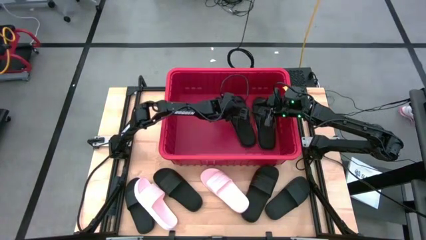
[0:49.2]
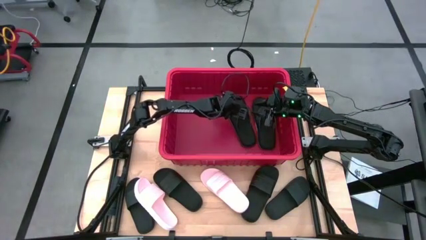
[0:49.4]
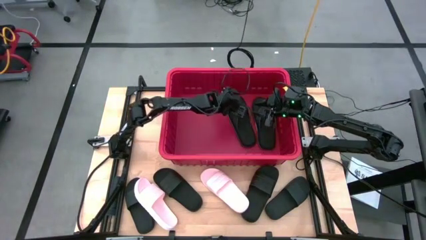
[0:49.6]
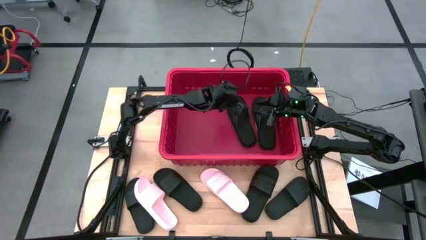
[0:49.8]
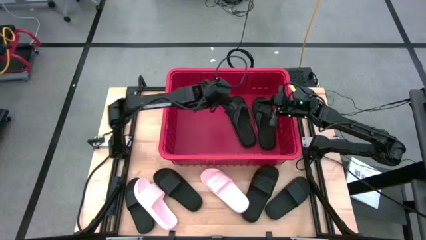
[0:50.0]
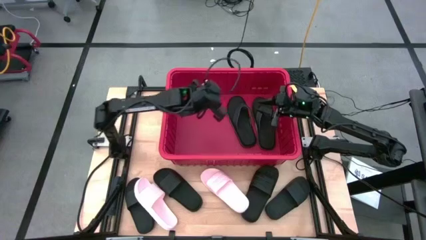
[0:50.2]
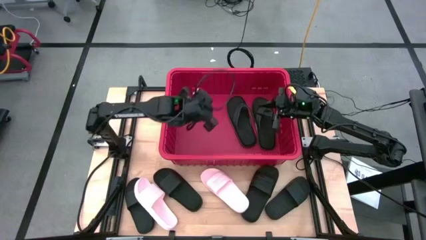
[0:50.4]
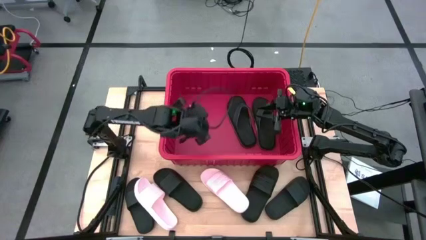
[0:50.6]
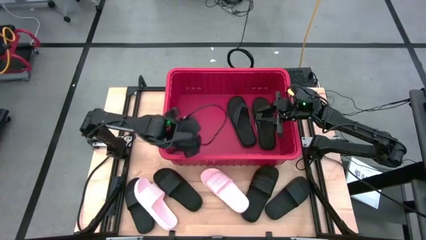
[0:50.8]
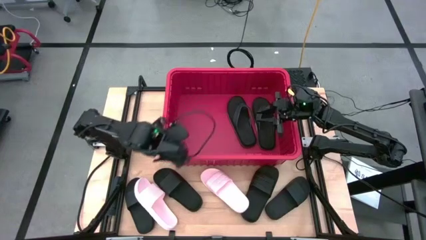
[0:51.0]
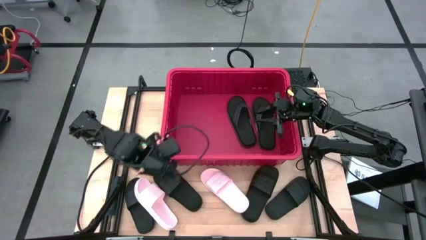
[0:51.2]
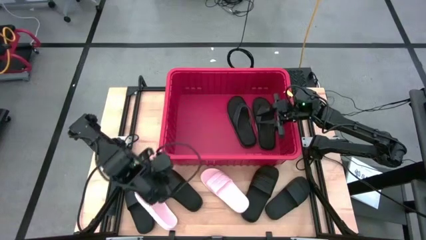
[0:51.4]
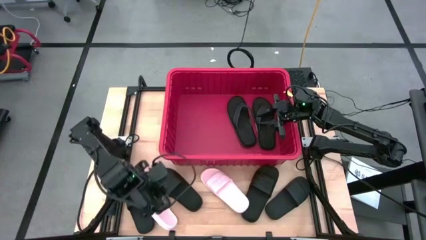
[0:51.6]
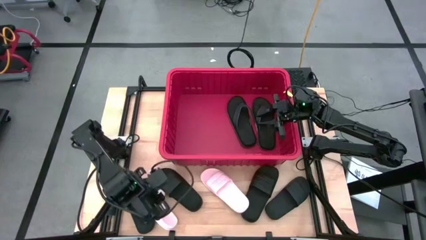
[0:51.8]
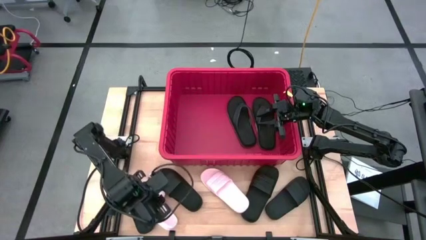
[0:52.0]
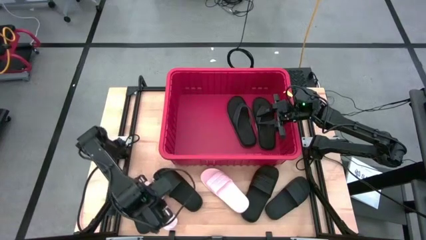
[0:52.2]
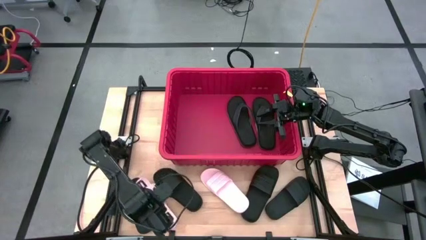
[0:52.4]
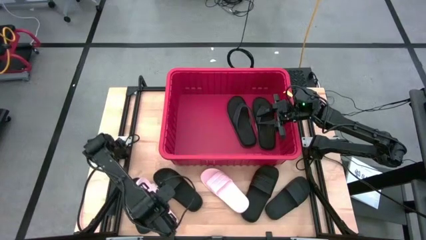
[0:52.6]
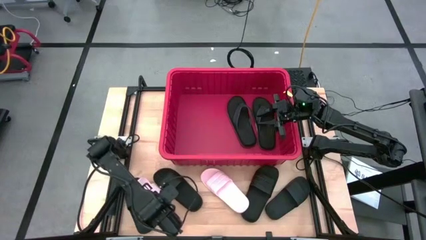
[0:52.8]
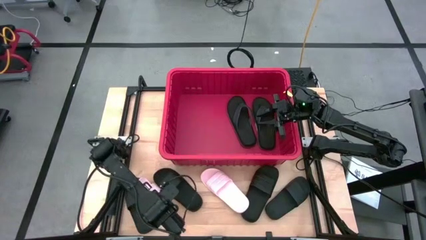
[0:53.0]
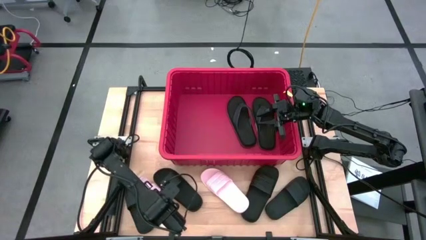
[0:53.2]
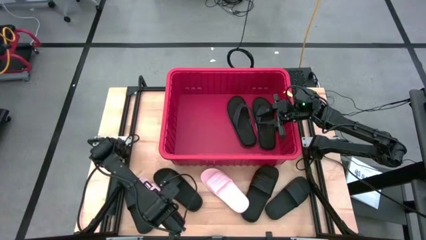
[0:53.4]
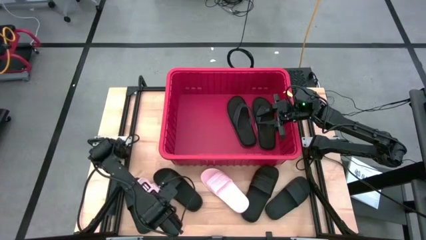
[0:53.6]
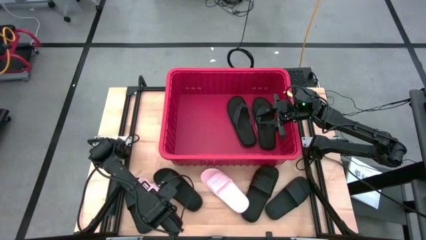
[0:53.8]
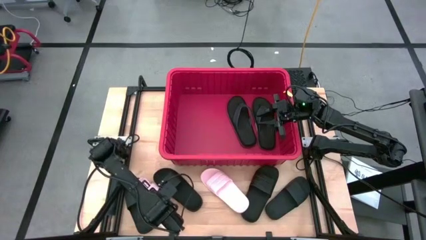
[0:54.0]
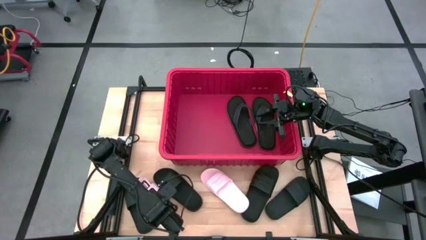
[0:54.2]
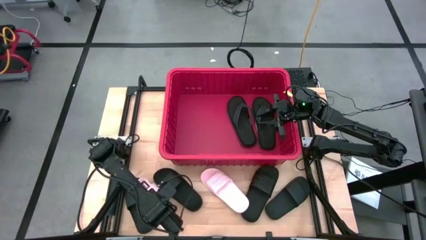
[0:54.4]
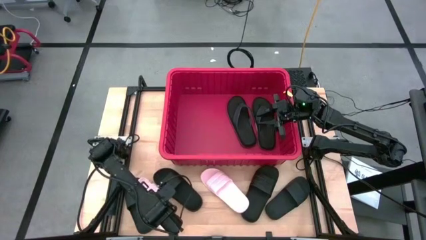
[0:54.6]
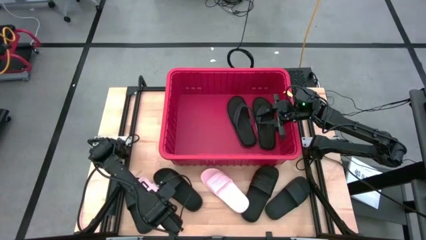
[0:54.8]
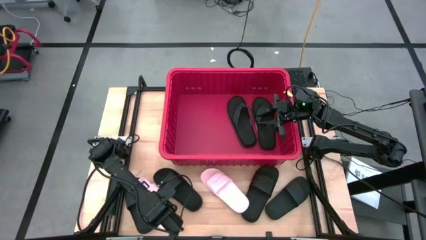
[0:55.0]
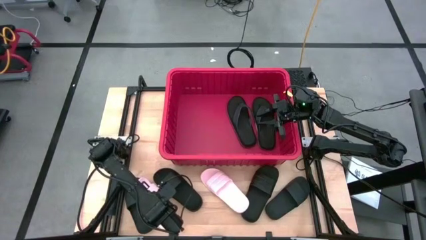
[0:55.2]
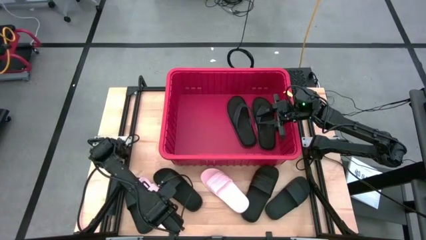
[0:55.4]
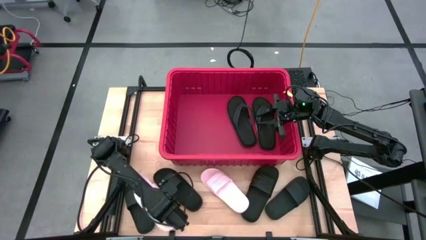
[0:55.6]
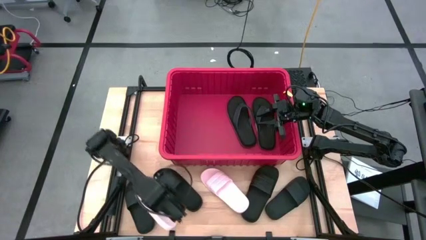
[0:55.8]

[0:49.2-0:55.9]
Task: Pick and place slides into bin
Put the pink slipper into the red bin

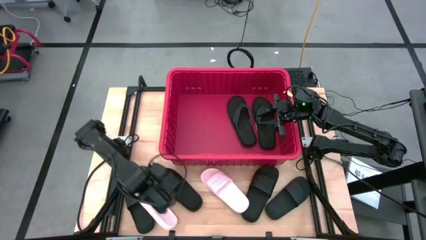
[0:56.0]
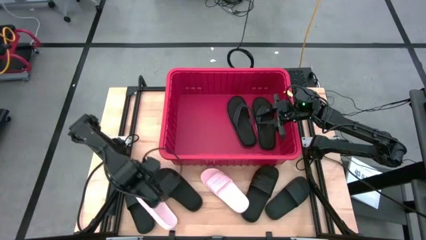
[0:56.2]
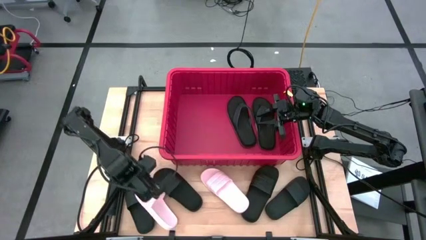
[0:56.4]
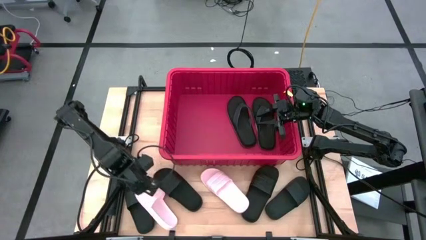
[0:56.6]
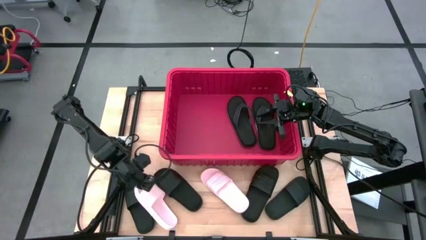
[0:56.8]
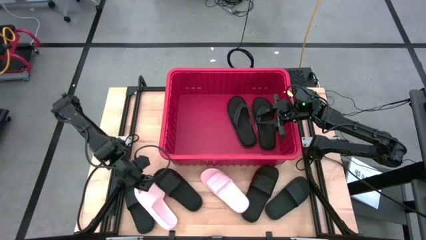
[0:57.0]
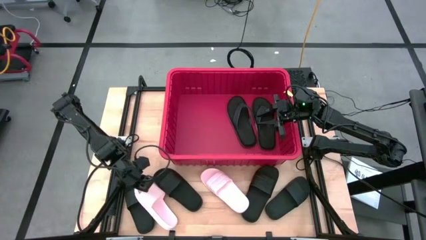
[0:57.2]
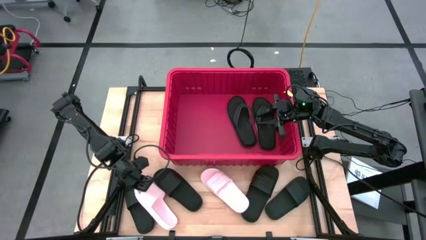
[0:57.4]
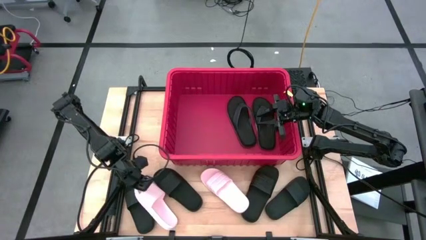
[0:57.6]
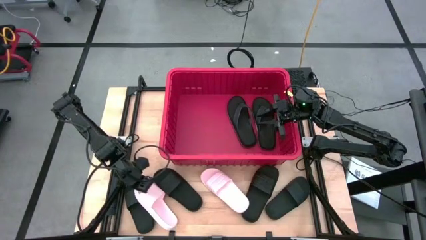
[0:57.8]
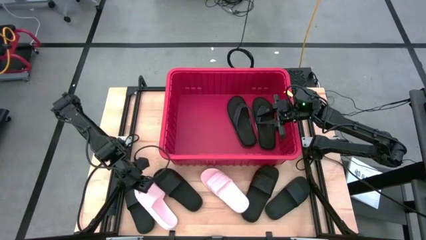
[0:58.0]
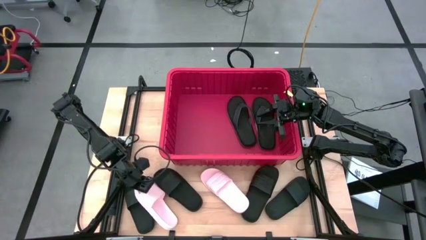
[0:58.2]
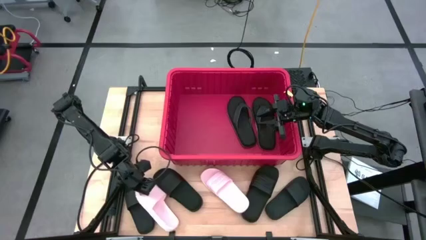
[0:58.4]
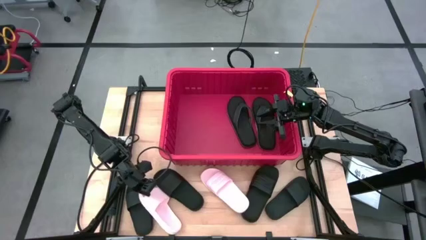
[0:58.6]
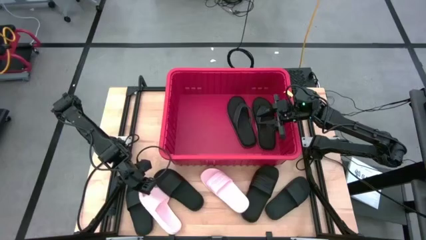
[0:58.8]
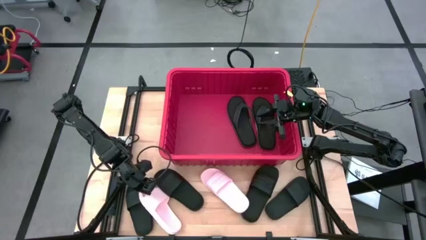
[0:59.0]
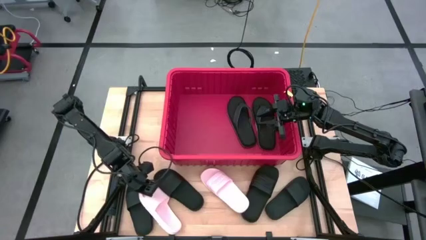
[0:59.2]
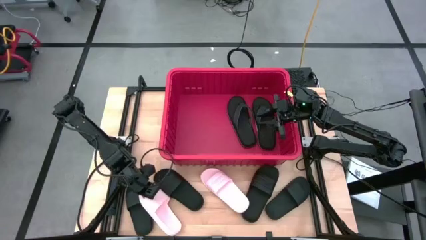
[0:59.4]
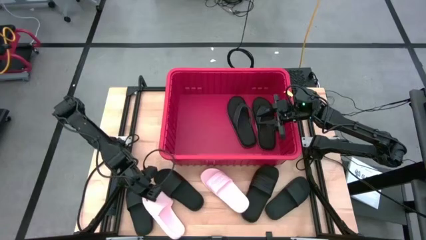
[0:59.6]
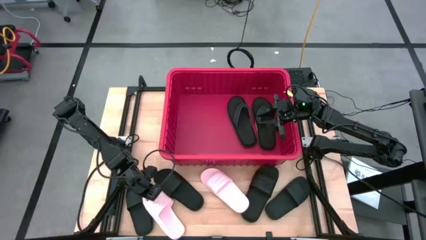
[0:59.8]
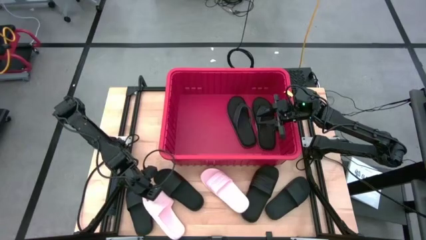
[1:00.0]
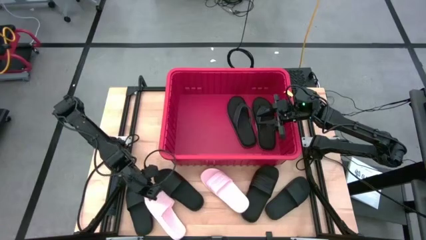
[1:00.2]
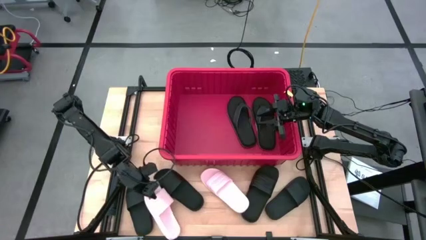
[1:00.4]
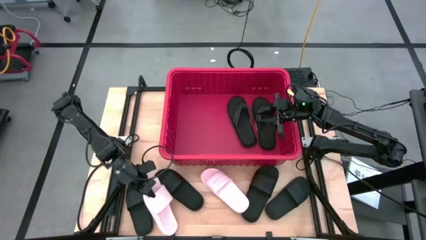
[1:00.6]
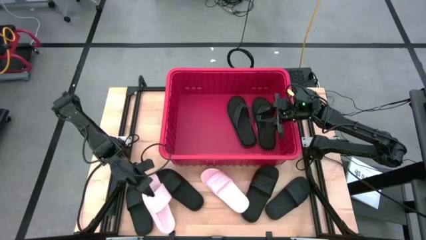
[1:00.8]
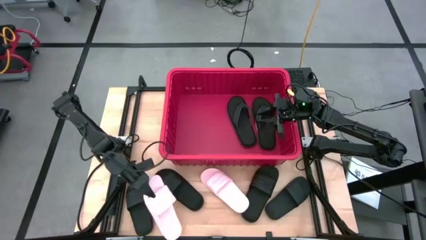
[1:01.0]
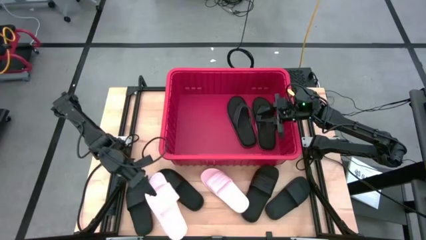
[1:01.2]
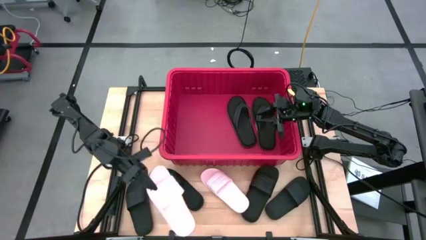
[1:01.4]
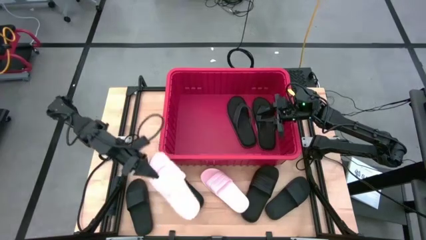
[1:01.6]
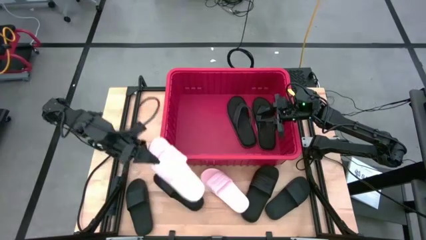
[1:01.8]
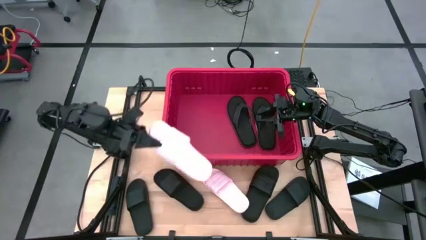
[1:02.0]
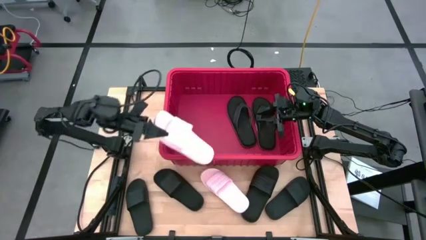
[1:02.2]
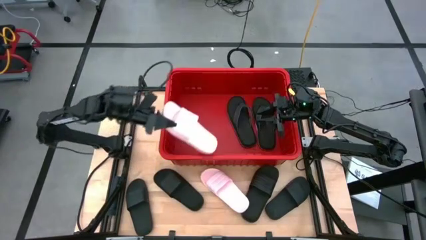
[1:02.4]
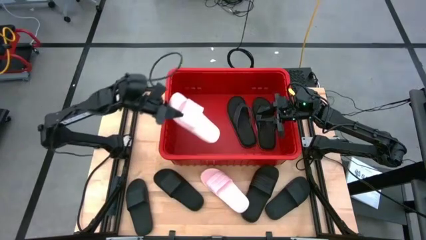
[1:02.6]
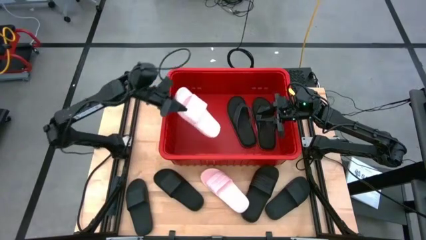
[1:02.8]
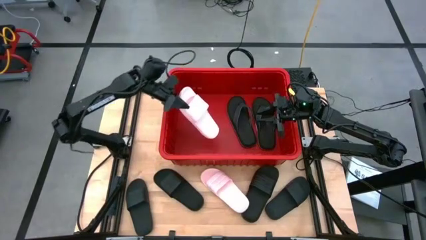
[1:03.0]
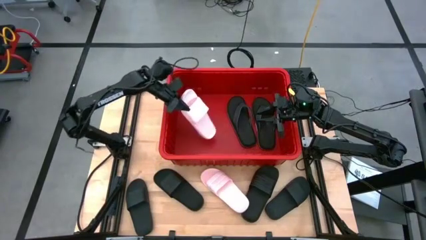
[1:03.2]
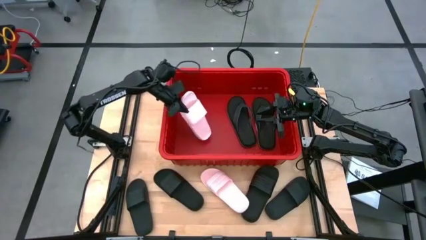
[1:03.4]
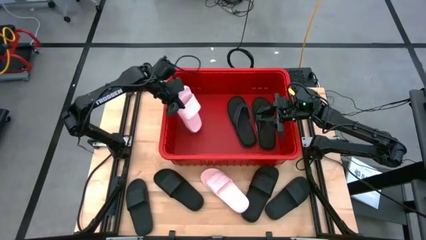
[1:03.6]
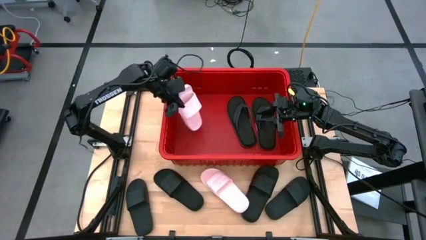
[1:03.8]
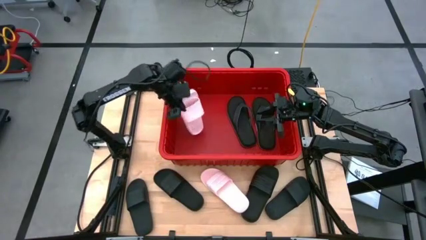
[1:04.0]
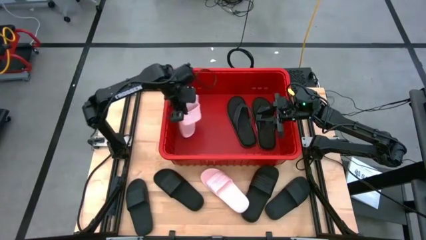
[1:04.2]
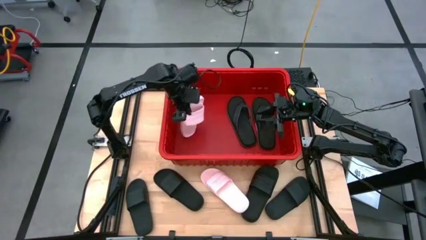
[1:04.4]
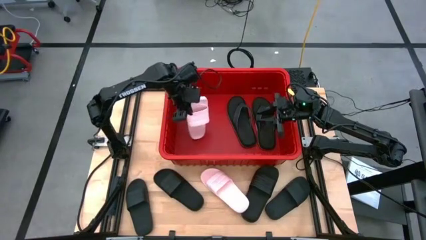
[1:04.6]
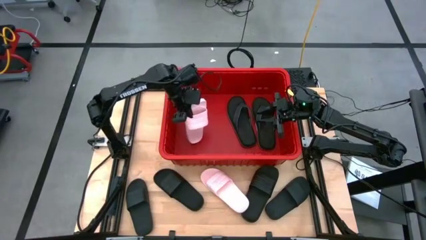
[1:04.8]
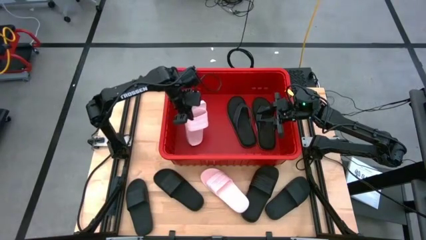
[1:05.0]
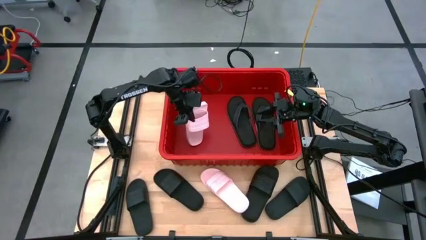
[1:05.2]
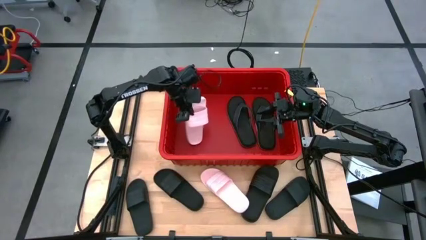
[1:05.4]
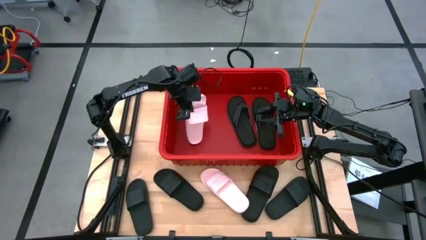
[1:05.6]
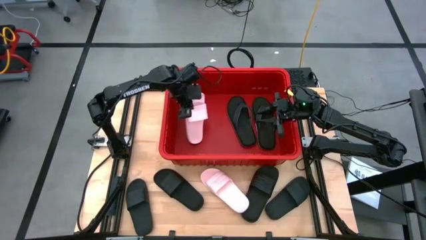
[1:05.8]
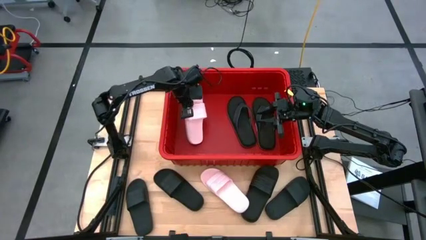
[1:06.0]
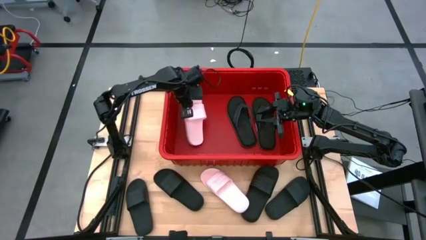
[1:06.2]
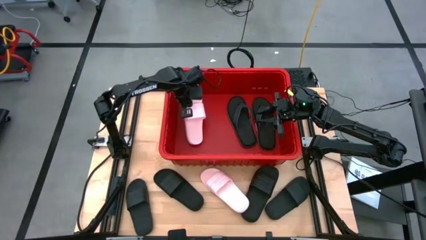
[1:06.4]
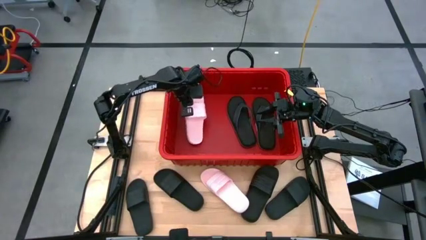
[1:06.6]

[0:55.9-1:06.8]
Put the pink slipper into the red bin
